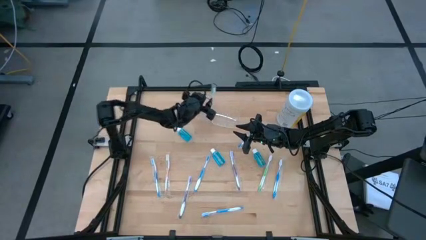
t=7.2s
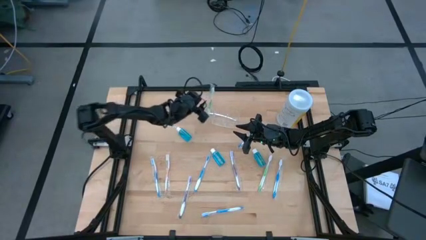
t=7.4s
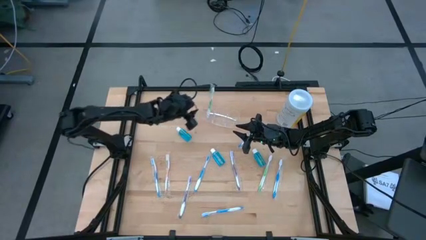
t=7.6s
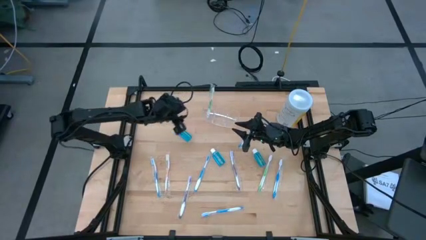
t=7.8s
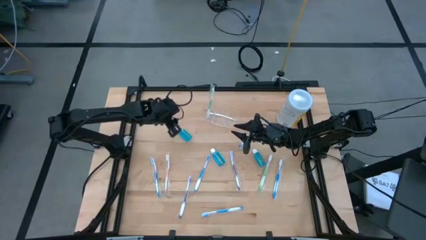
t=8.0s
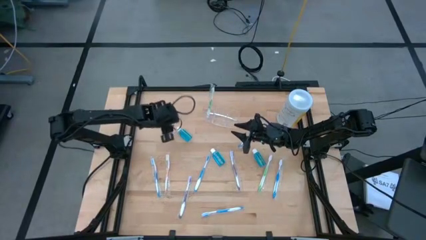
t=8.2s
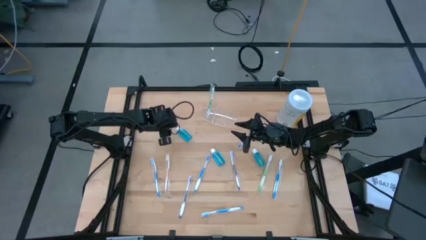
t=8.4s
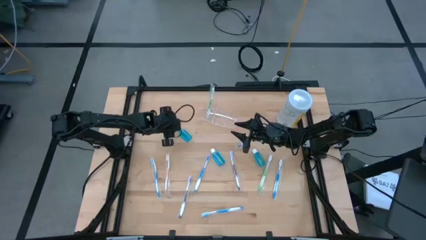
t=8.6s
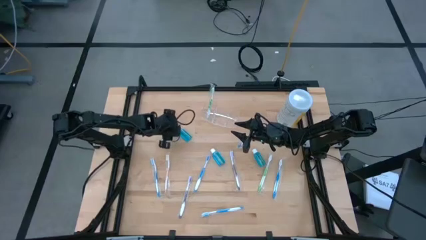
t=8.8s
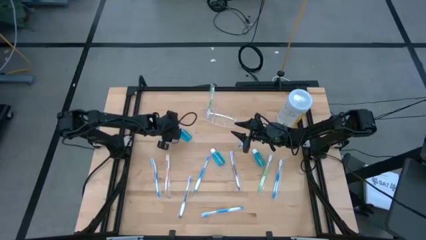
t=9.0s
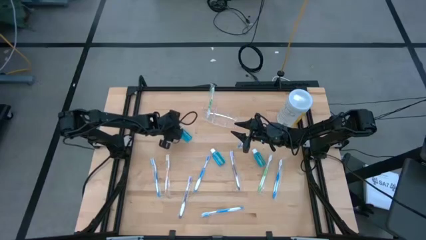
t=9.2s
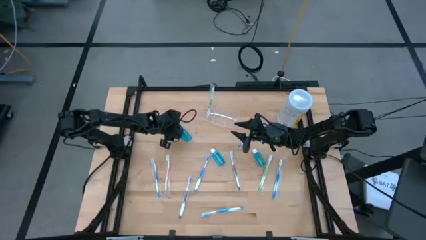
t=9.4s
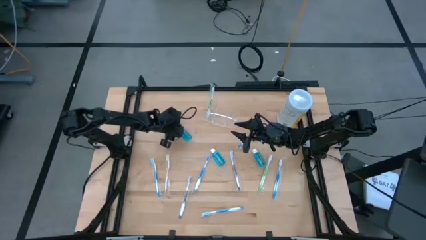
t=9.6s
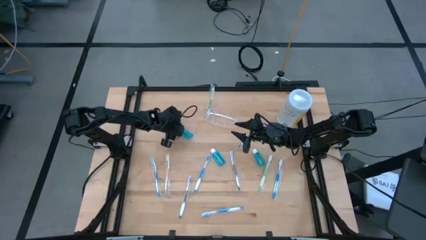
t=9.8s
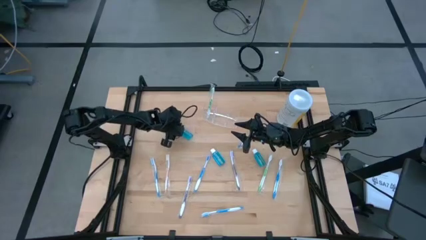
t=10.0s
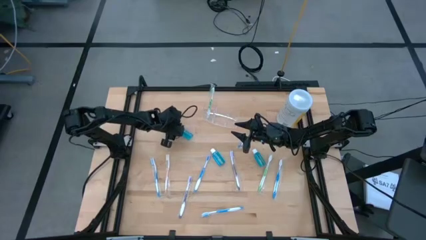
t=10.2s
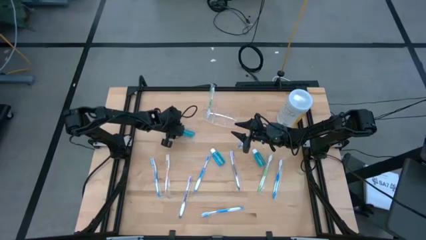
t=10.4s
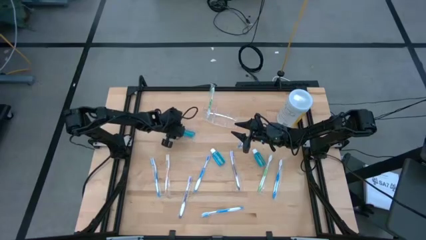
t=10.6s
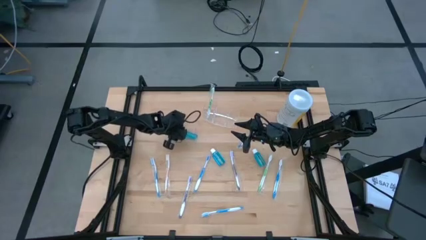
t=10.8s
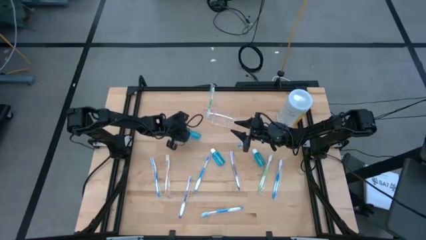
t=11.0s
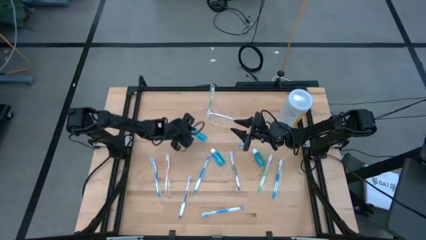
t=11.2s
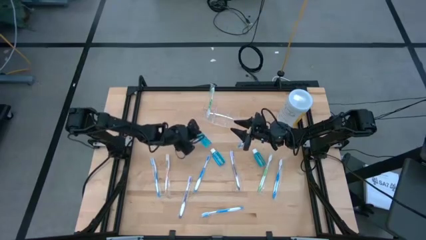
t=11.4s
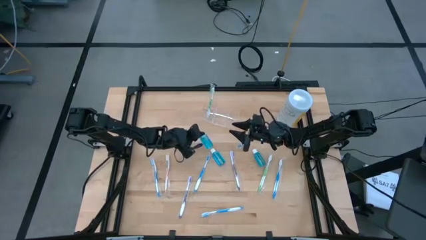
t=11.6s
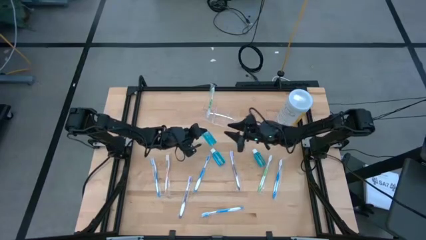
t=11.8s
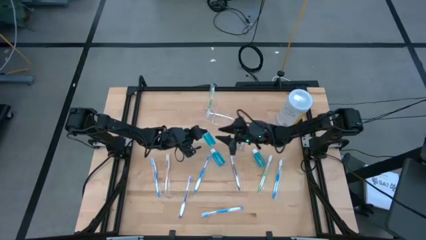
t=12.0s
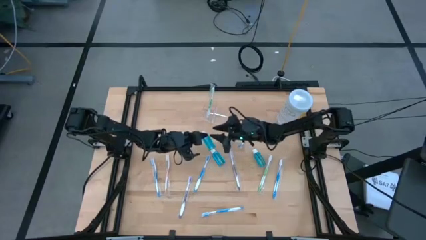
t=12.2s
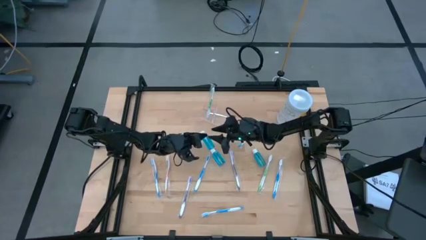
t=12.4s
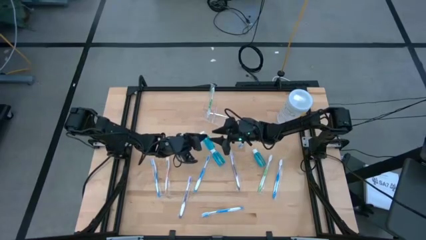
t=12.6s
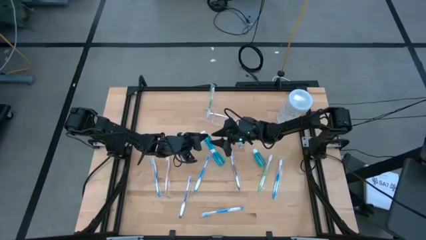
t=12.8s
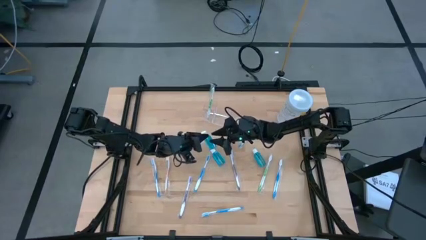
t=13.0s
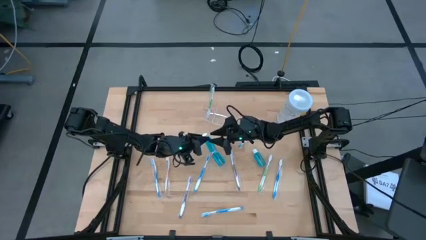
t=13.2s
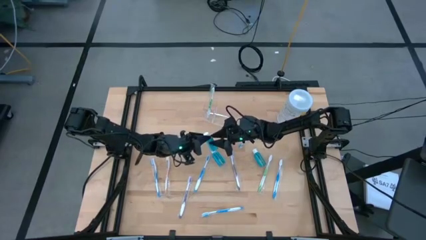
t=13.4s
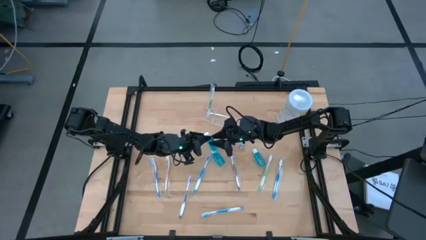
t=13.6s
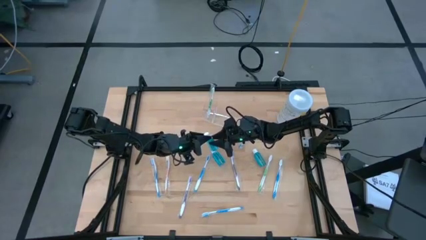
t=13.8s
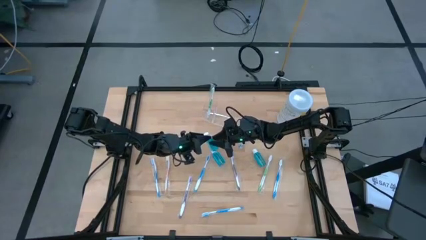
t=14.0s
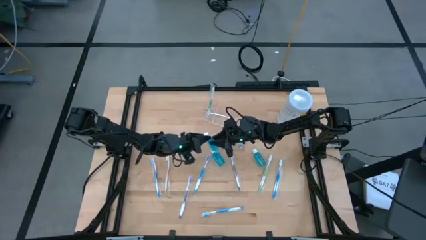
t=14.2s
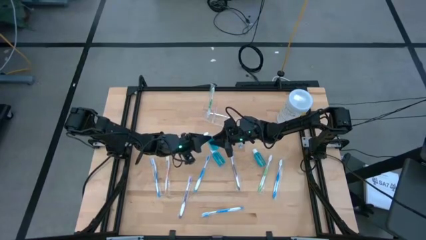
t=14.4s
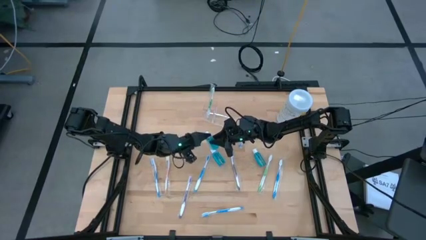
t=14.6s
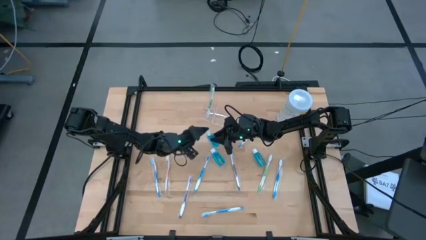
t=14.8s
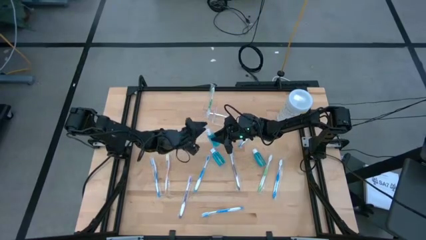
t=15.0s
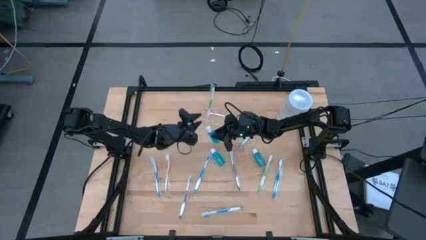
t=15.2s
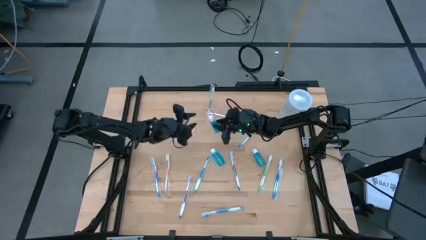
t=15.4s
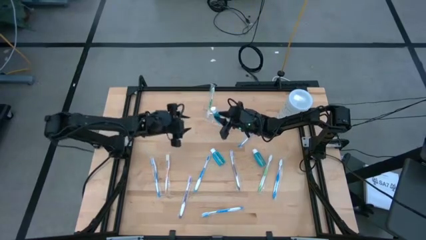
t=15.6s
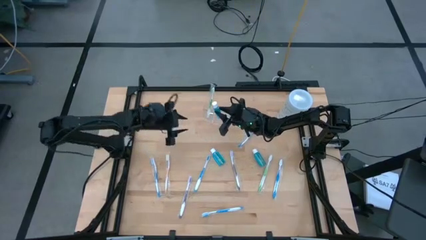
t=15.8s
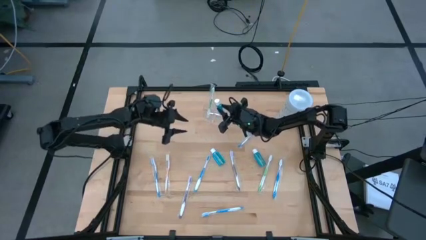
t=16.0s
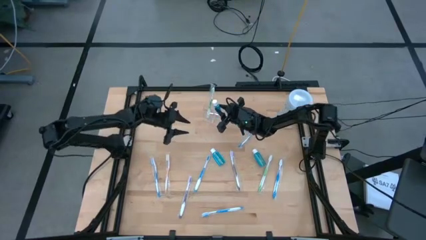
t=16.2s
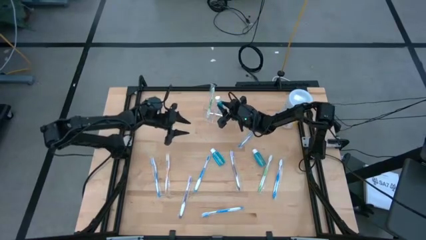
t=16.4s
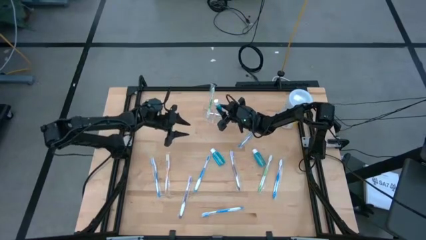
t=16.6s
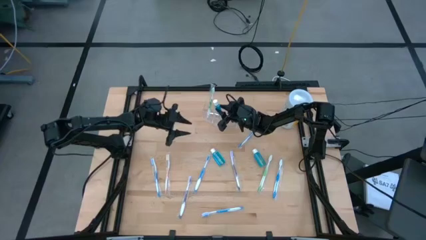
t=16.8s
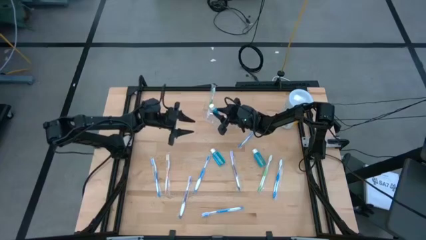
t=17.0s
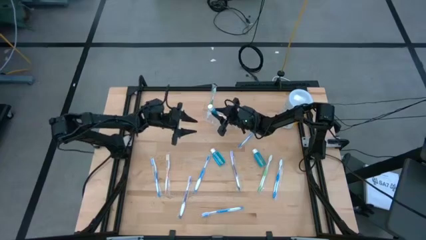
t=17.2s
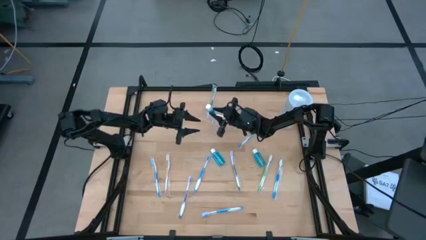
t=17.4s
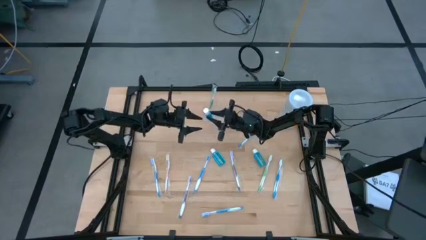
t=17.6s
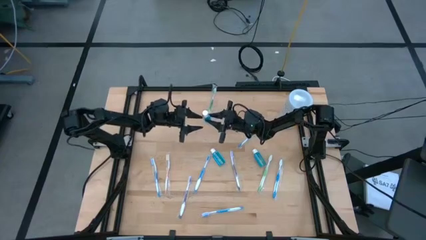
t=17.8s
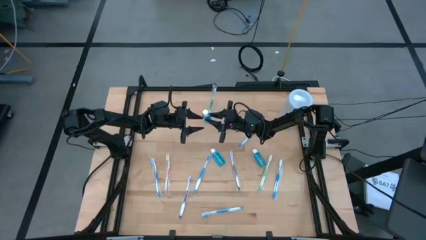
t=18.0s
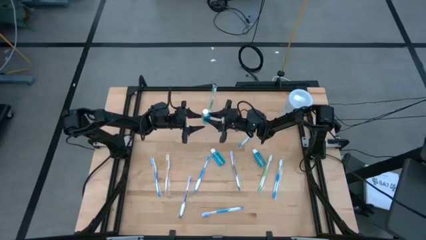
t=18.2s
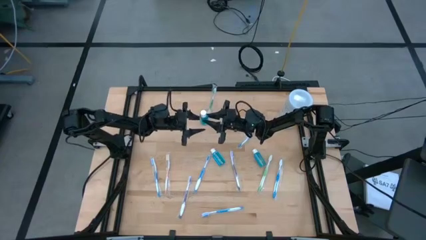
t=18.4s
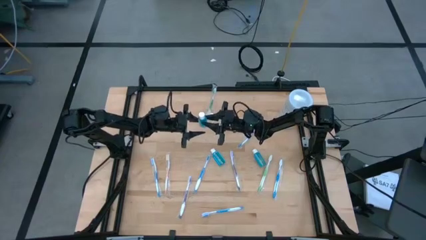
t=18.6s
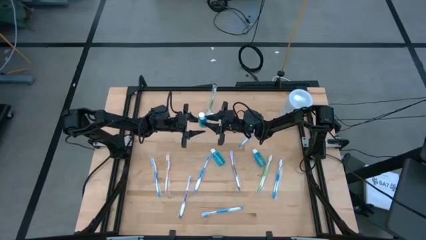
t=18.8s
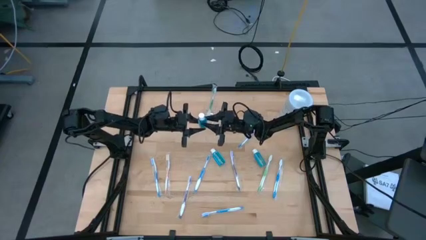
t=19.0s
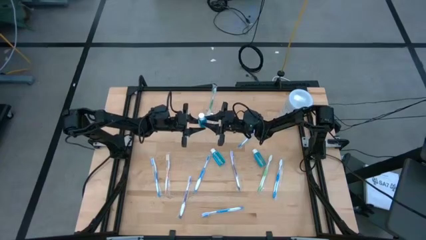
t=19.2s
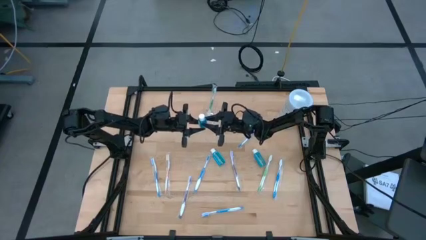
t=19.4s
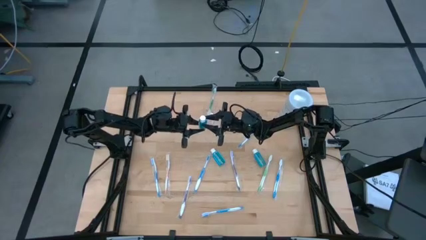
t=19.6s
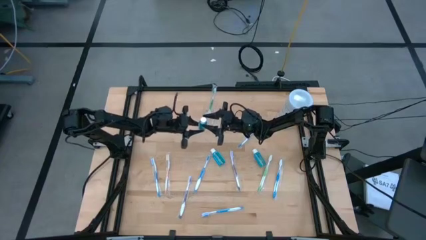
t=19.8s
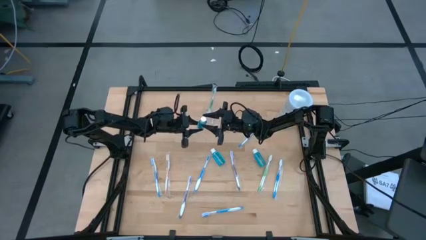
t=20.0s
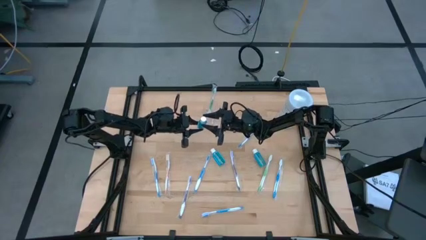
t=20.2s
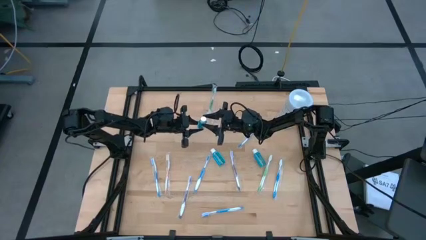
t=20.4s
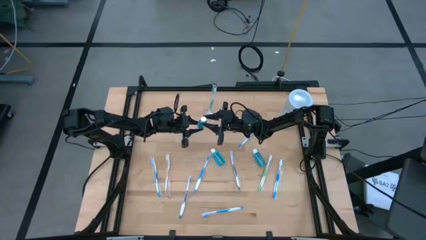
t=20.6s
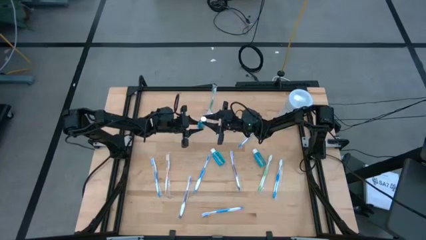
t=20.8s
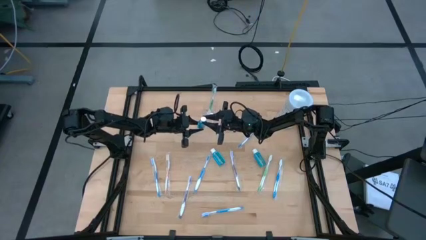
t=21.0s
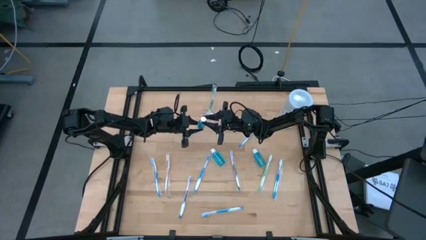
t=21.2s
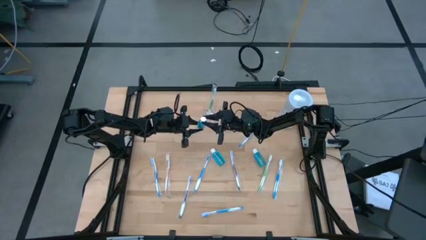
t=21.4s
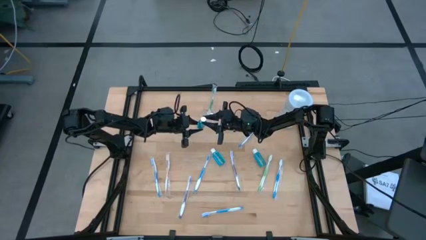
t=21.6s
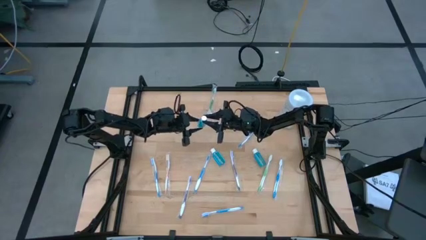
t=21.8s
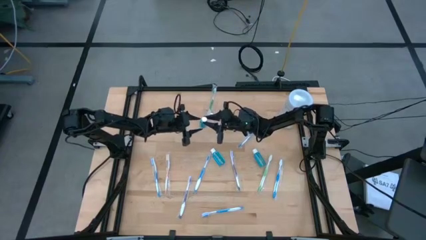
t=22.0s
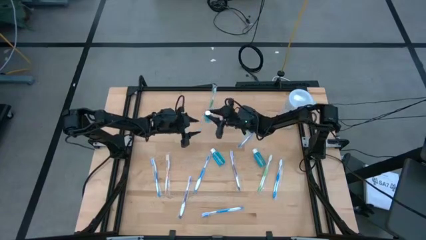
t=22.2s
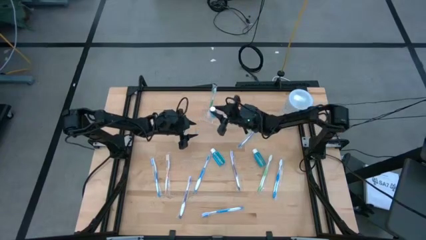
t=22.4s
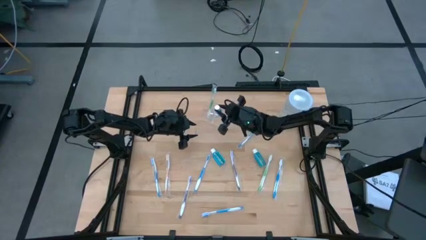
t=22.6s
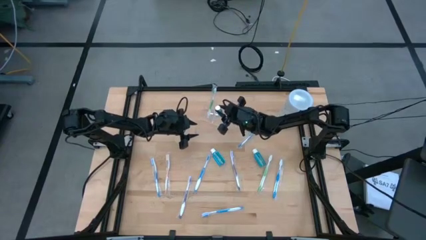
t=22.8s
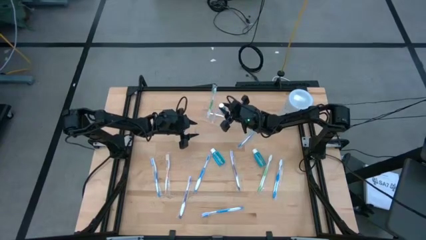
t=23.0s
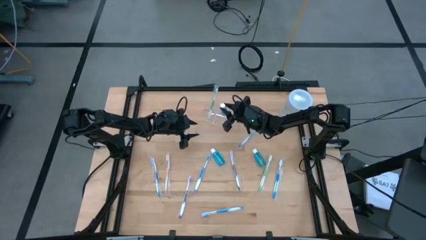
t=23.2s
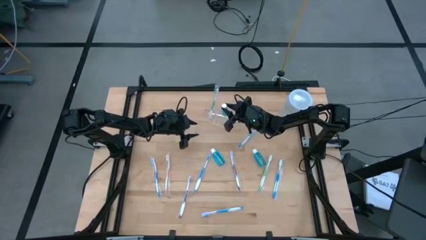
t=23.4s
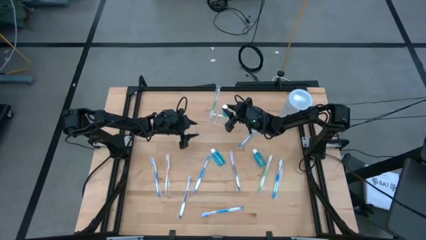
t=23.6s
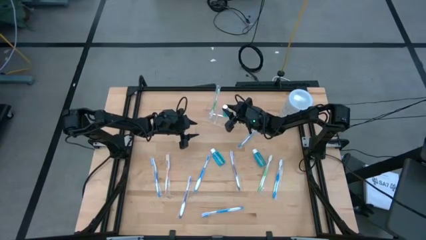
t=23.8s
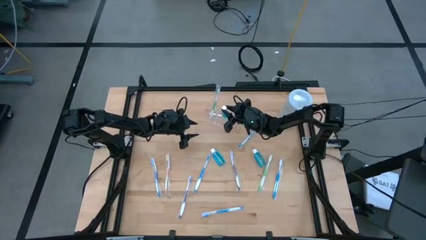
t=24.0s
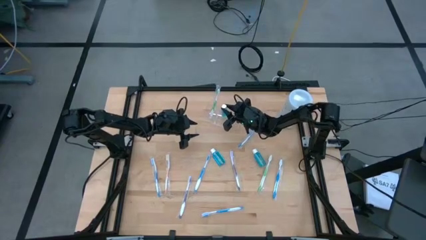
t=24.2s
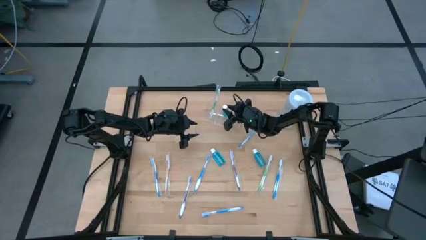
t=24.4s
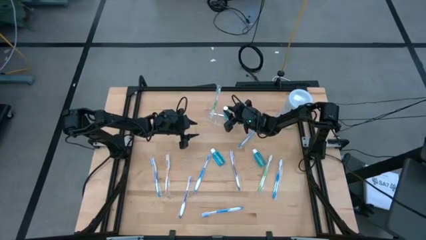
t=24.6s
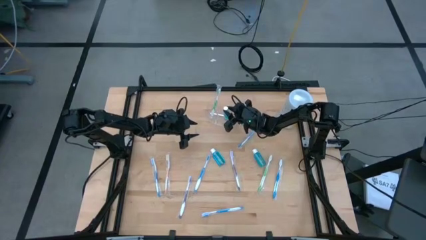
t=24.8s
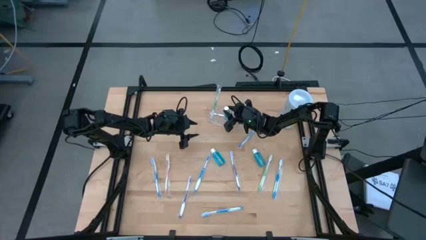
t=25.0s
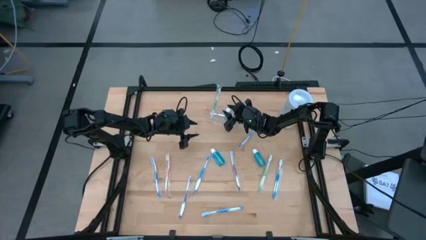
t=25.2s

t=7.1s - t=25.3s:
Task: Pick & Place toothbrushing station
Put the left mouthwash into the middle section of the transparent organizer
